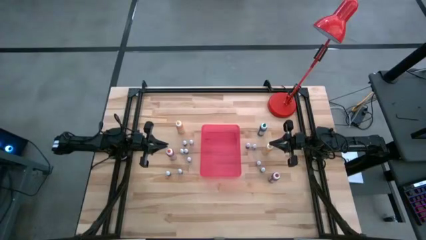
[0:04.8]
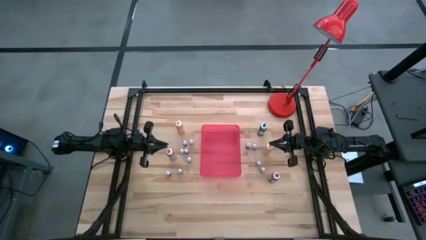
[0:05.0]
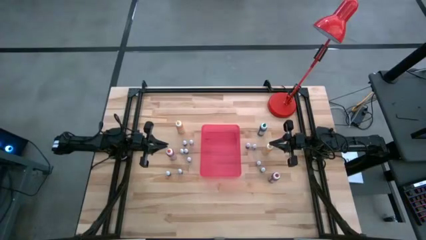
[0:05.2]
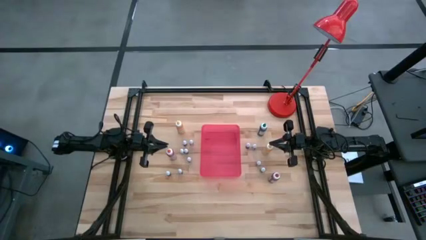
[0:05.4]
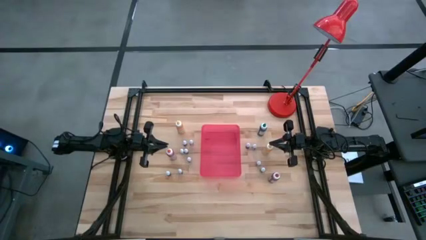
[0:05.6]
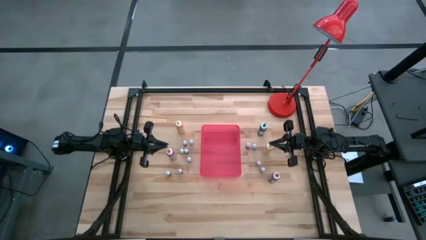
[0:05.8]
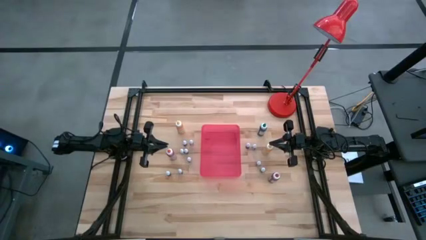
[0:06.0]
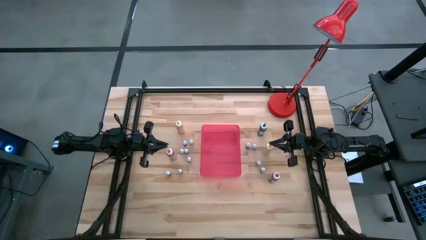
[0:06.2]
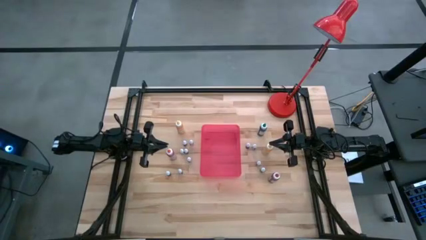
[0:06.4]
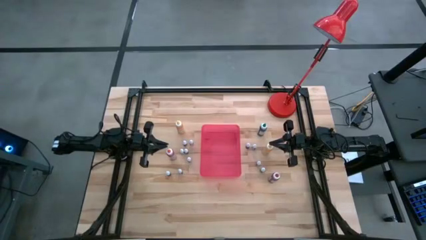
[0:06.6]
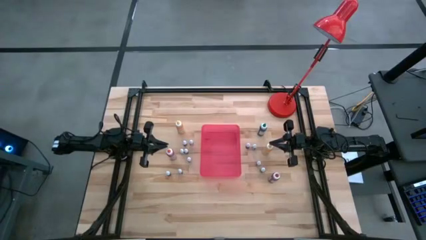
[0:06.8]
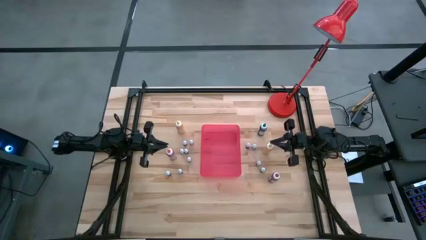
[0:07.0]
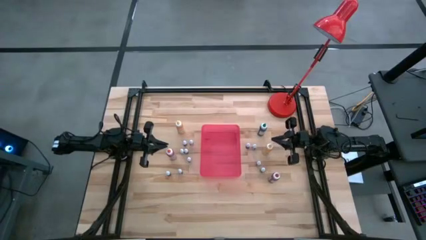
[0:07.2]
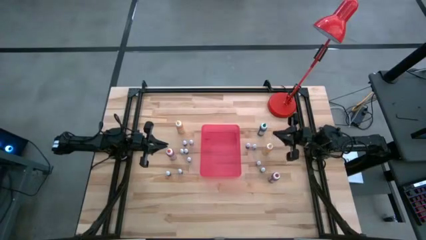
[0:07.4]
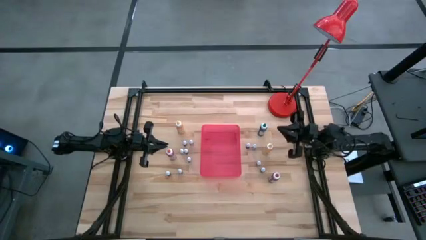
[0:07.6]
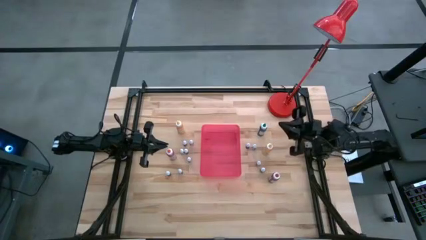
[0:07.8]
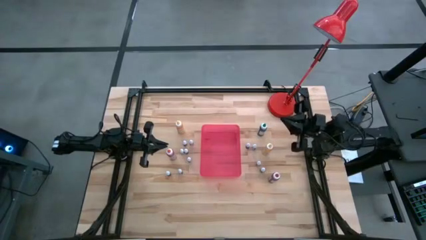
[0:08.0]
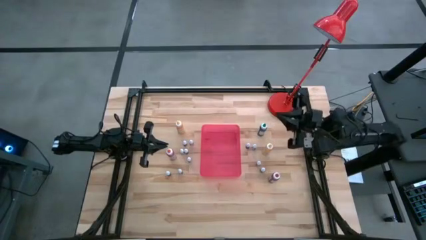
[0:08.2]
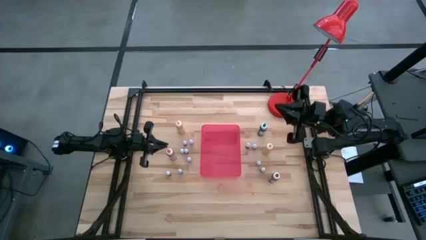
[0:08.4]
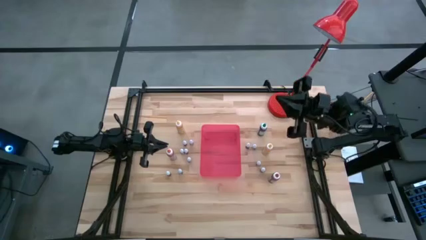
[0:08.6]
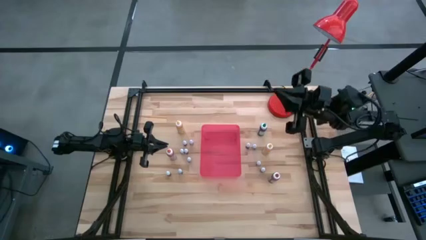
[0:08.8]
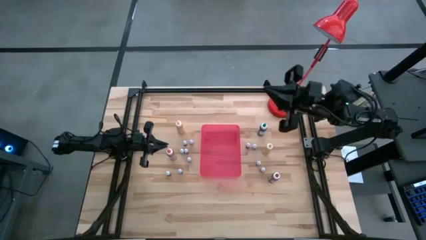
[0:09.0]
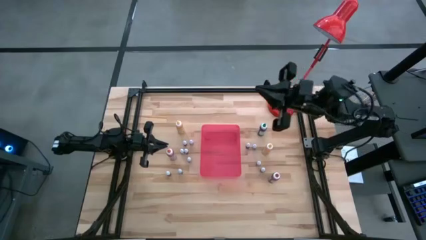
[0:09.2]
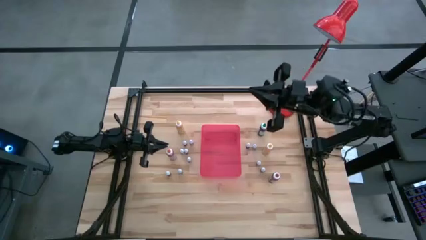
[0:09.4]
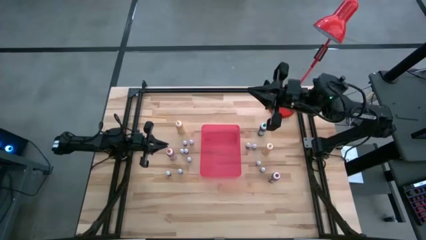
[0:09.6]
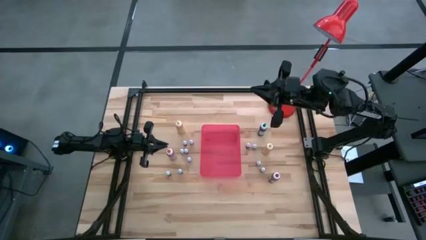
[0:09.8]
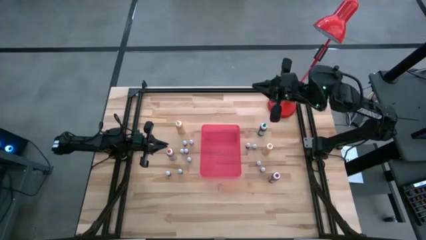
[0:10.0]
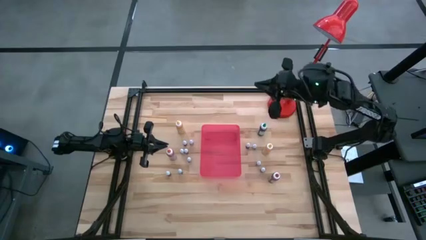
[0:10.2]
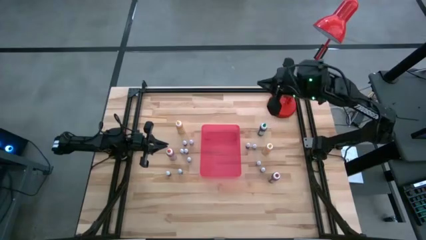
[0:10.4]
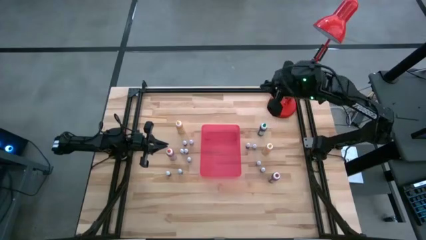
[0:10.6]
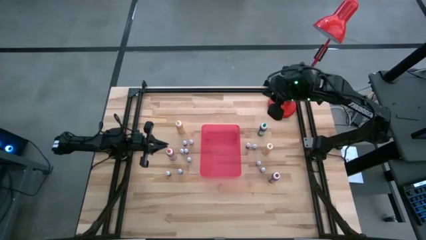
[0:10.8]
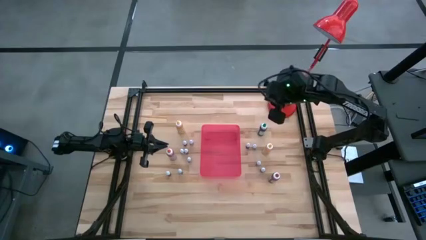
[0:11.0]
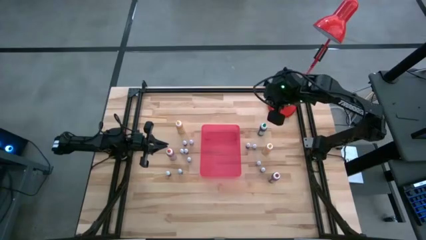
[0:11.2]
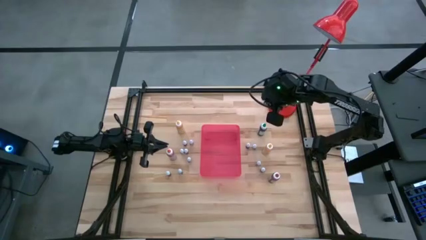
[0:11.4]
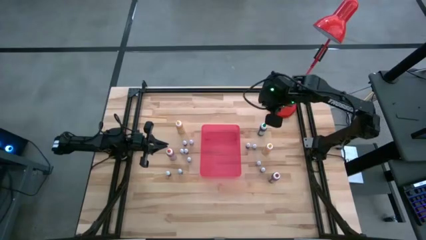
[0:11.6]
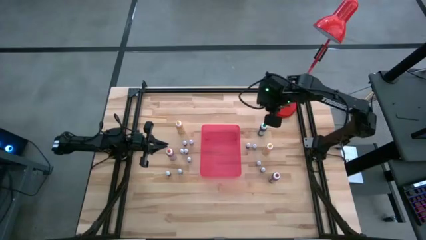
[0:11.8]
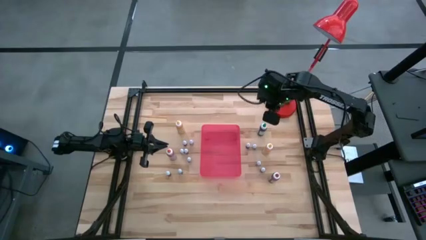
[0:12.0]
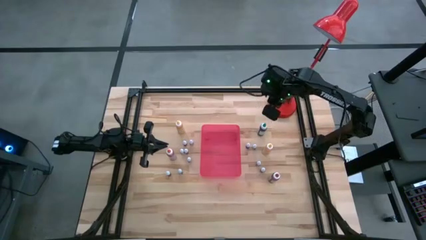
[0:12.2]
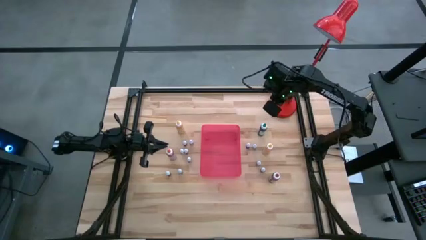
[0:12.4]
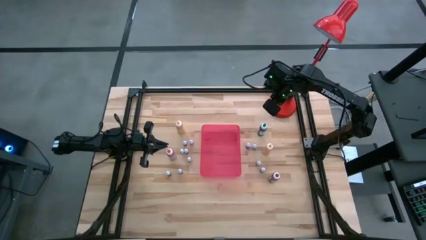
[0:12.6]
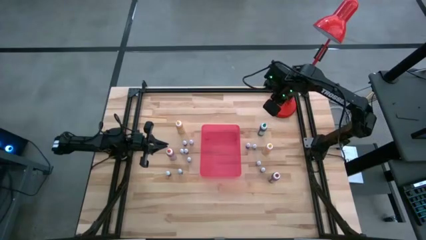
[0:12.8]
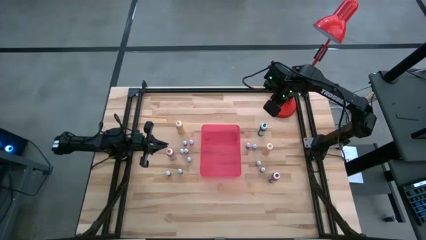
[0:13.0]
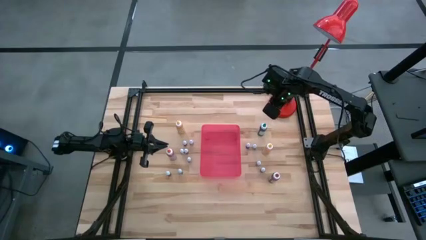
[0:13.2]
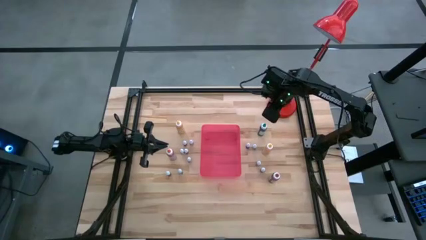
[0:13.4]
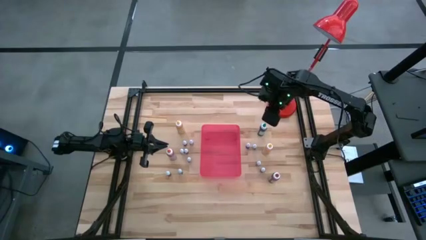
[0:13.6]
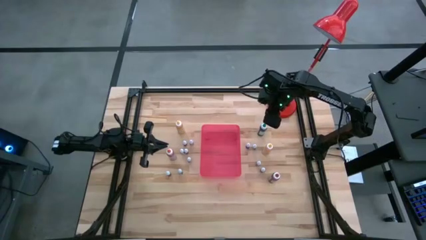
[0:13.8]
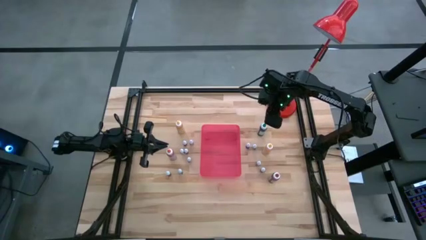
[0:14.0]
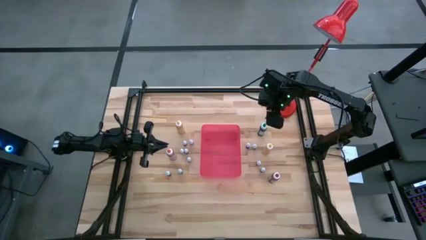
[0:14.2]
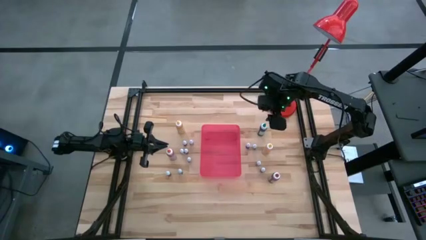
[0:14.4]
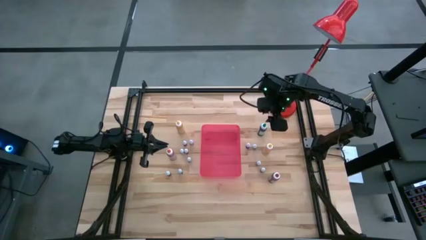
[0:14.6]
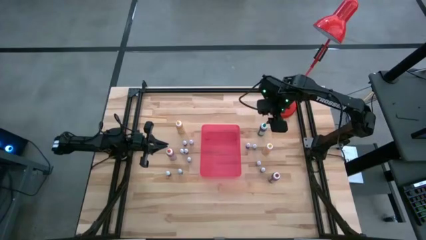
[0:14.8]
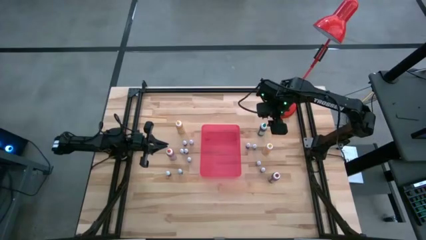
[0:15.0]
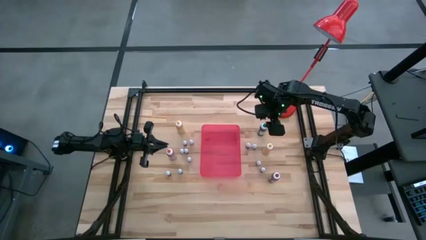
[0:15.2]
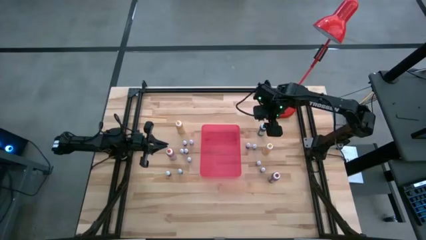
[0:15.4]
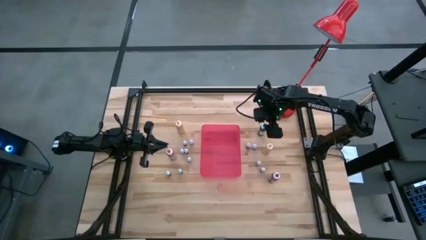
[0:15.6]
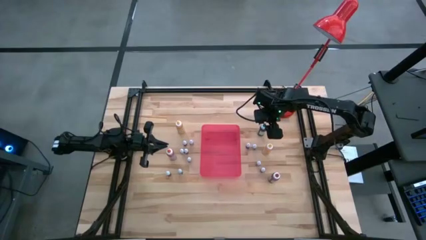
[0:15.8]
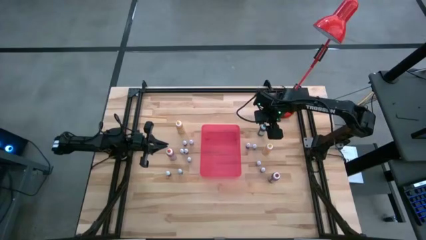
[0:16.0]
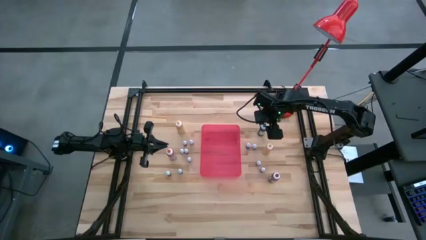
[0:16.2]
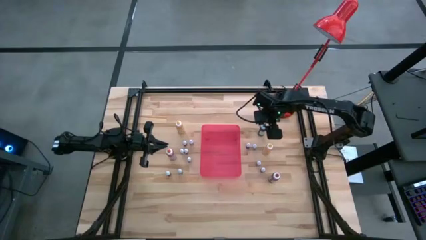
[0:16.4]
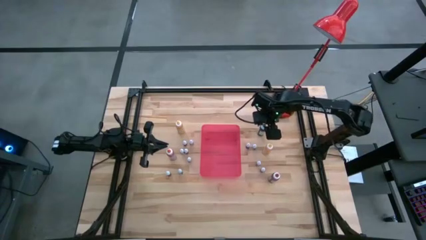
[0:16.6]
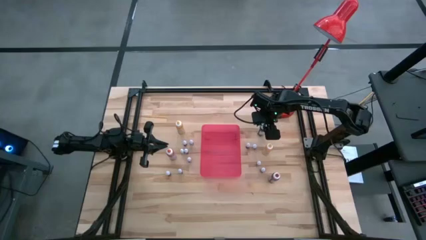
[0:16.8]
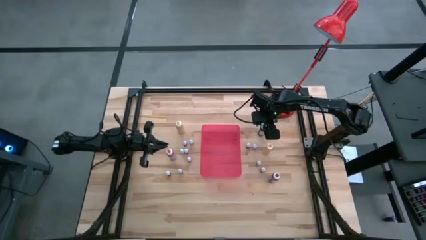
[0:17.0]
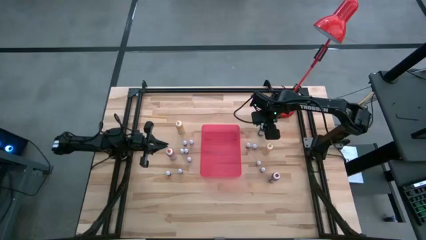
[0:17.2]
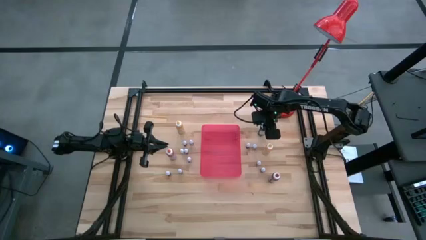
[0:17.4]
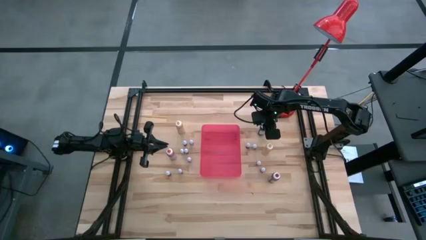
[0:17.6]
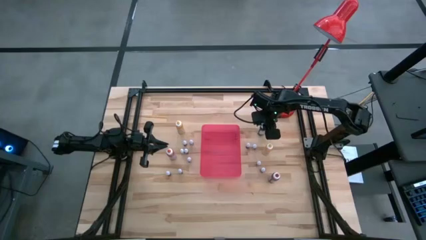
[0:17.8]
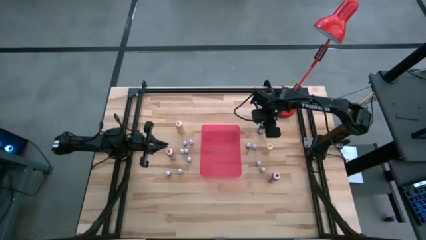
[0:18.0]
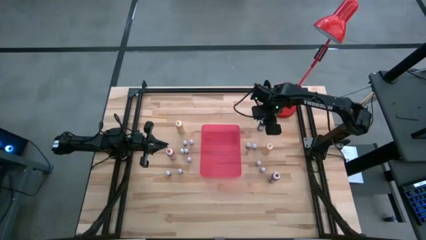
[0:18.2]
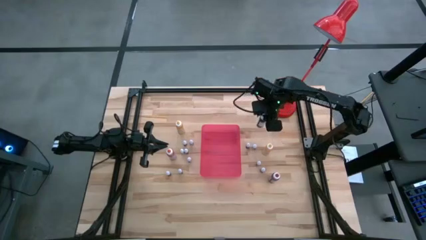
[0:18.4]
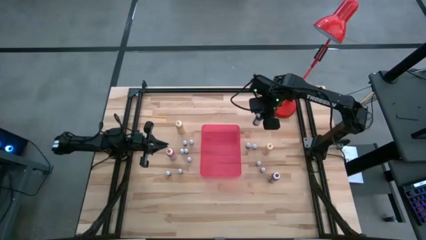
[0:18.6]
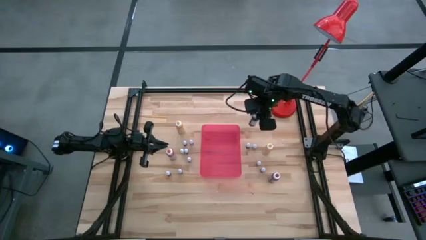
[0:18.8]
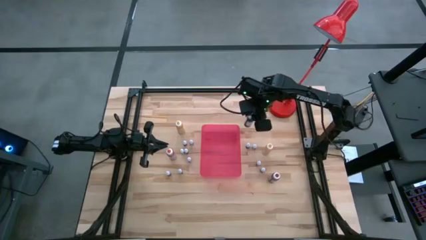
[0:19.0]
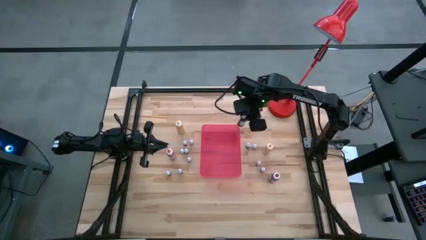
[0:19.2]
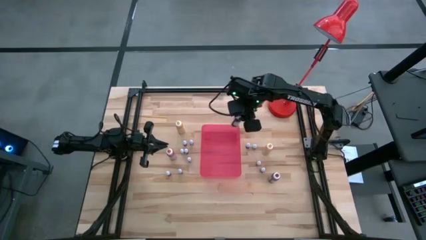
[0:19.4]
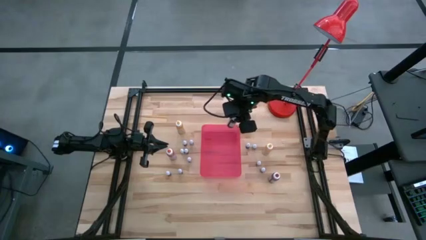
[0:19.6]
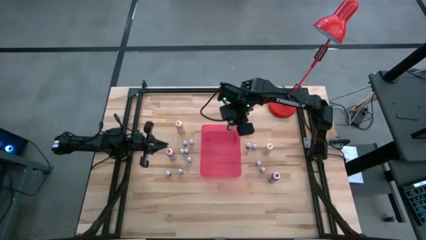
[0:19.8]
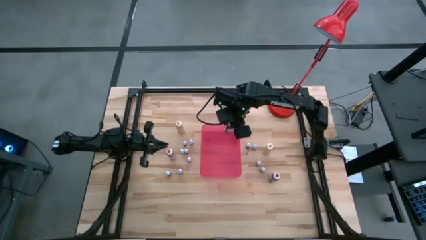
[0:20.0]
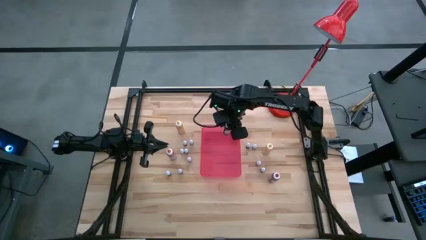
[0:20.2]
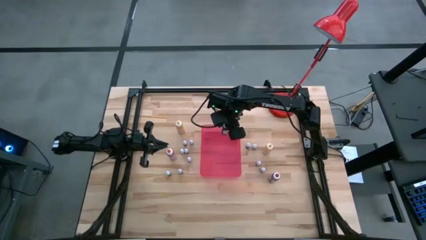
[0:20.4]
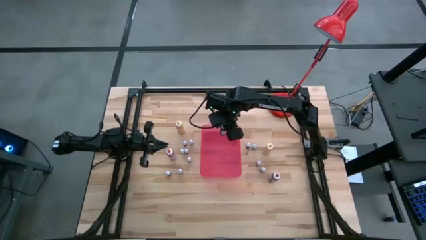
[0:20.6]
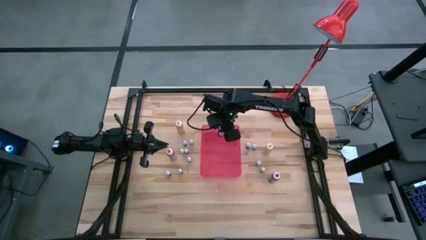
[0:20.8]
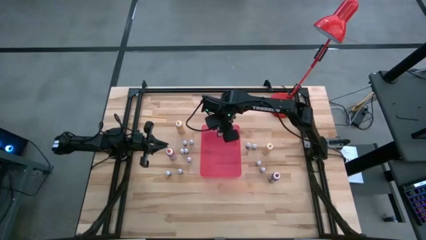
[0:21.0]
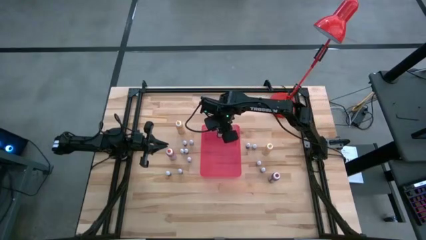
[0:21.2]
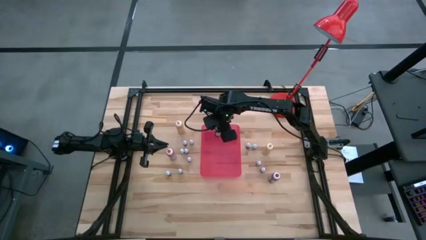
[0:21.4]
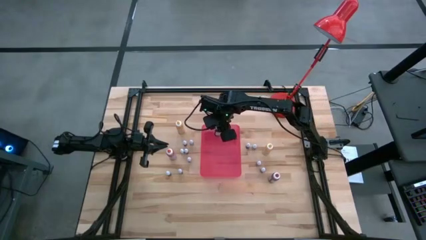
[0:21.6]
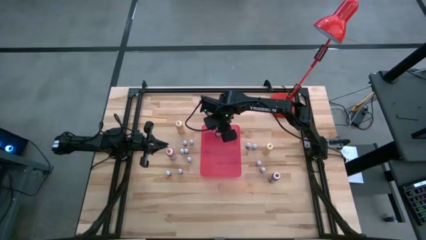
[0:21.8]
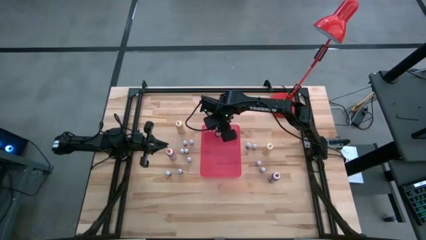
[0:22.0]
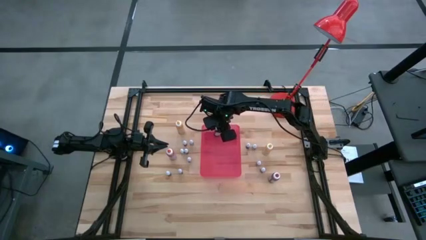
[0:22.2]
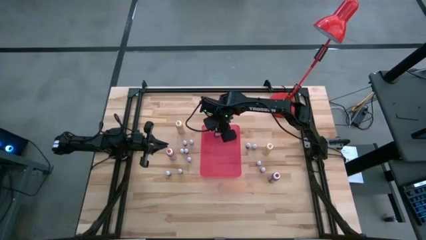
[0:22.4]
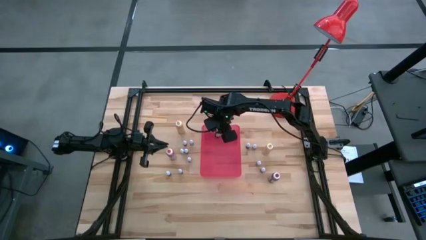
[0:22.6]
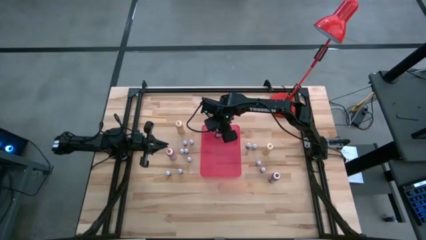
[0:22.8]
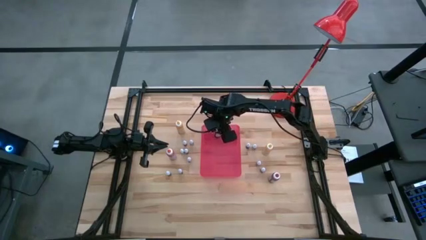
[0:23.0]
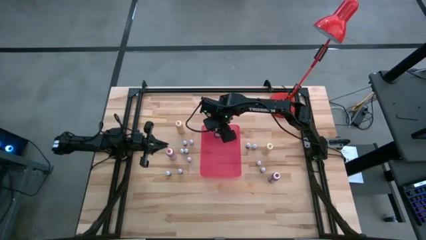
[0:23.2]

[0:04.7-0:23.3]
Task: Pick & Place food coloring
Put the large green food coloring bottle into the red bin
